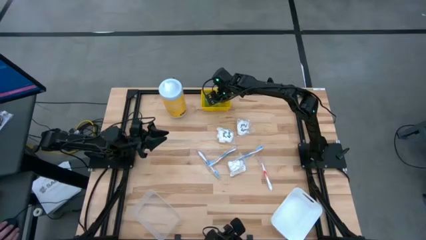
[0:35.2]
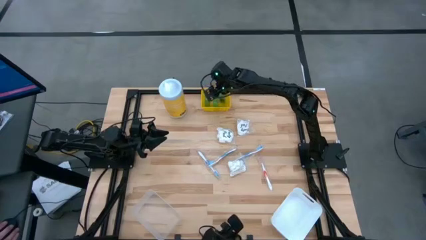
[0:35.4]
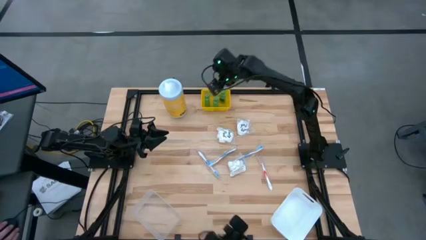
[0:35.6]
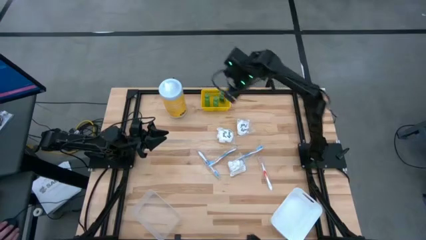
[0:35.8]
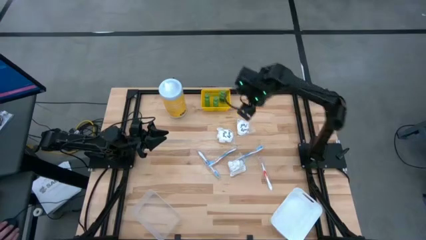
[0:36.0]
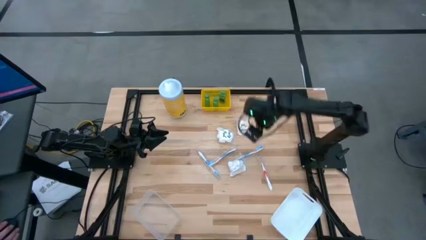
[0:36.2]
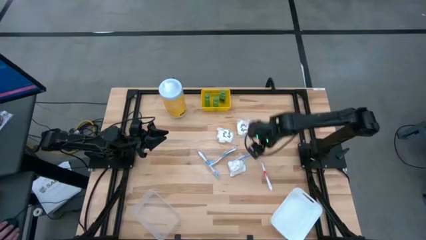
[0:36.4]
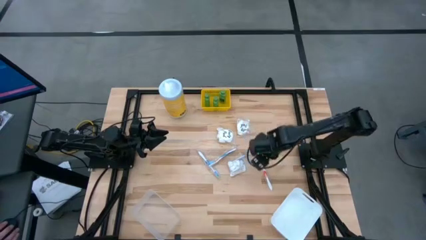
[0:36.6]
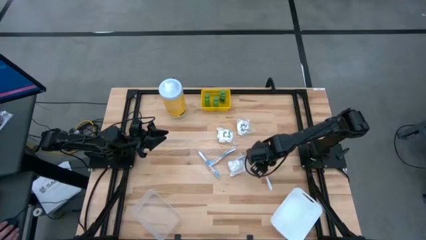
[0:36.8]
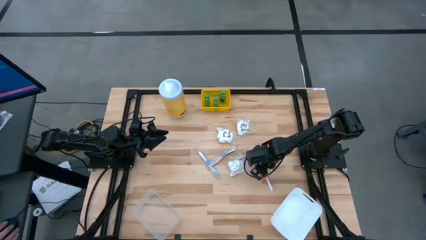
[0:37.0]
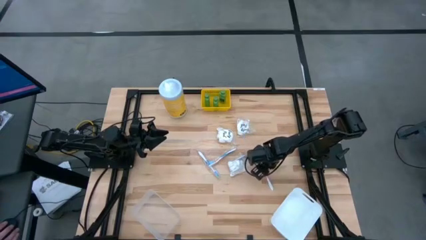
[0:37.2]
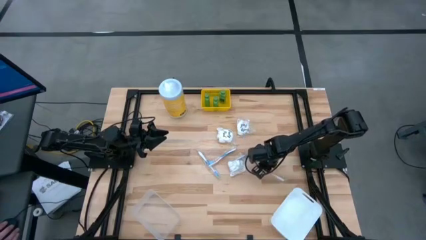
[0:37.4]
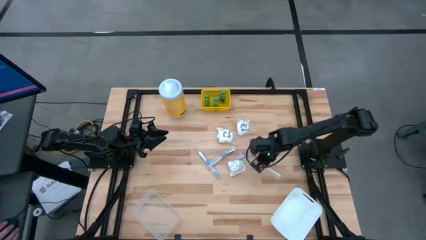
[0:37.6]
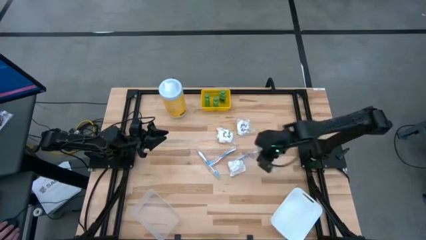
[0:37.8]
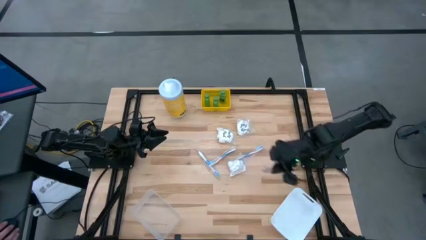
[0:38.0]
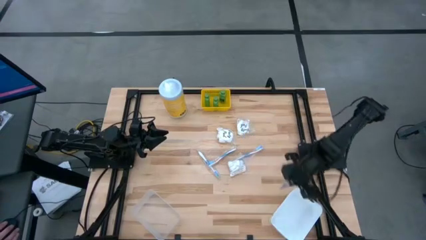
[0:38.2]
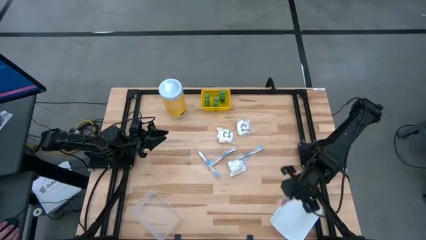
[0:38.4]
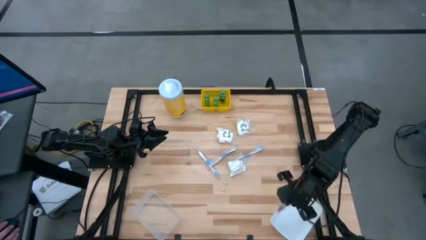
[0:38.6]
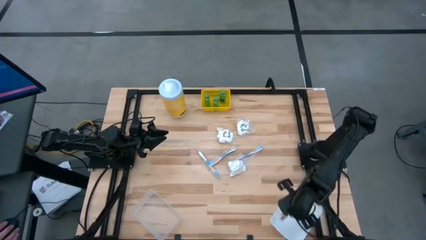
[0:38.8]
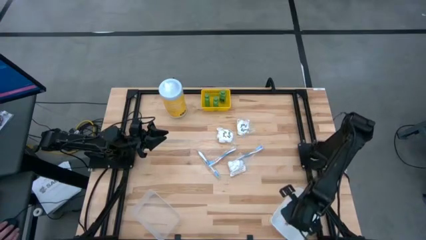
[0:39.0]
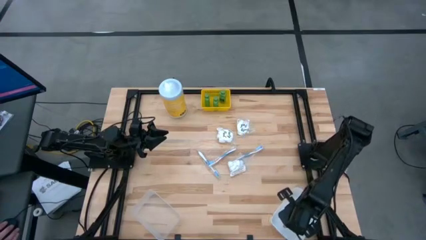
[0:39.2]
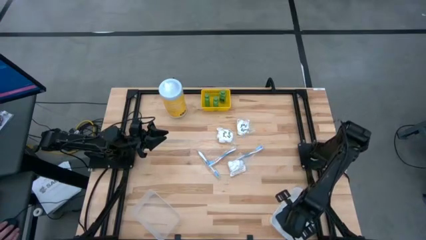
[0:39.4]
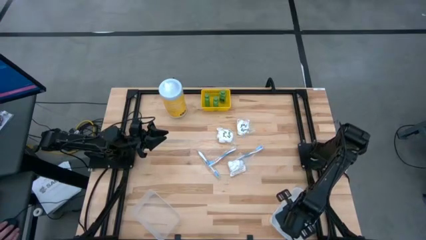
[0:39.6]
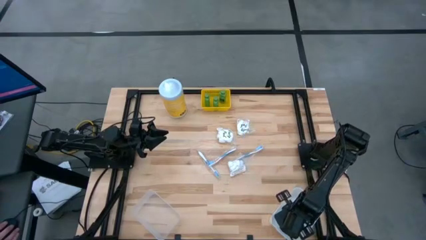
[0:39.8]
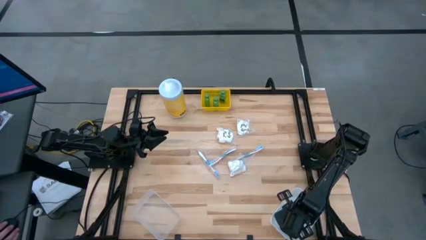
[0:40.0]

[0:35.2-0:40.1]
Task: Pick & Place Travel size toiletries
Put the red toothbrush into the white bin

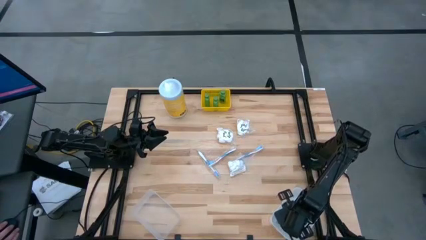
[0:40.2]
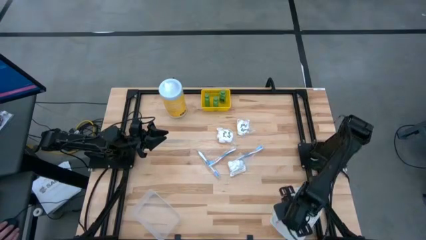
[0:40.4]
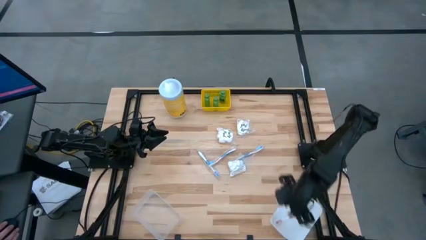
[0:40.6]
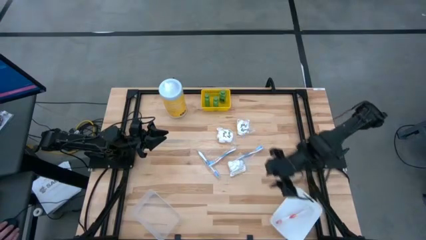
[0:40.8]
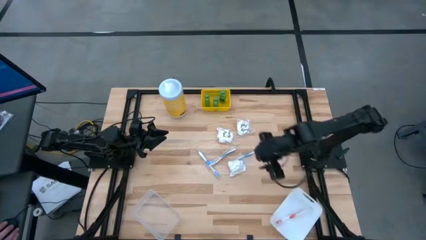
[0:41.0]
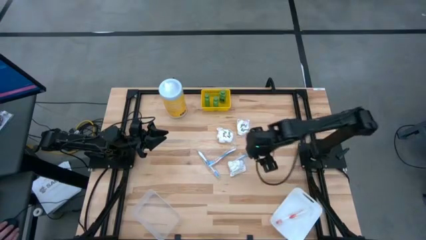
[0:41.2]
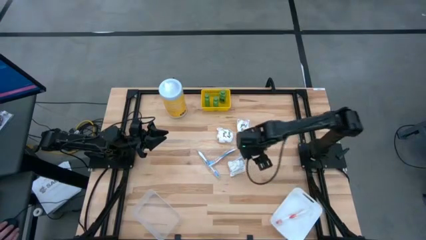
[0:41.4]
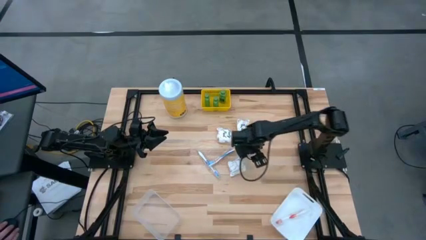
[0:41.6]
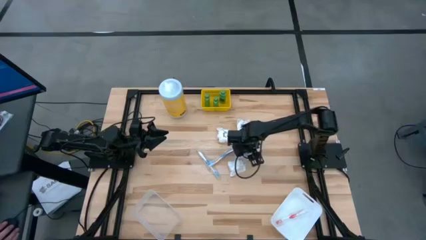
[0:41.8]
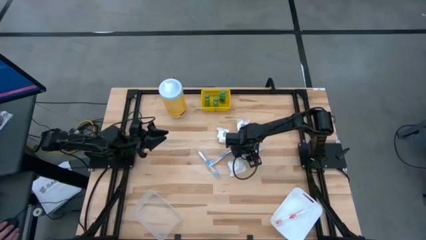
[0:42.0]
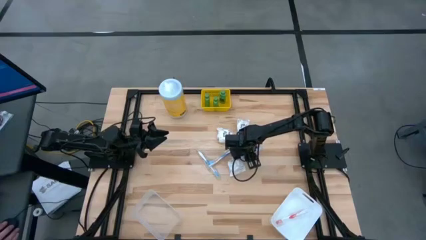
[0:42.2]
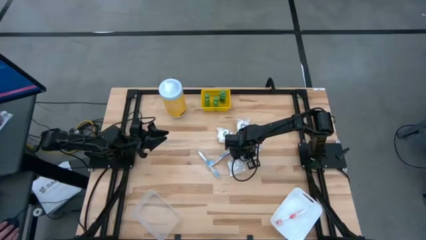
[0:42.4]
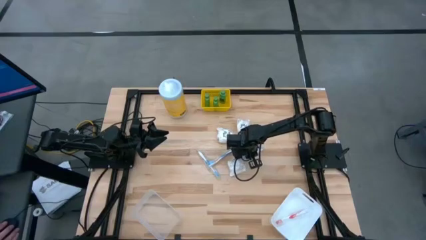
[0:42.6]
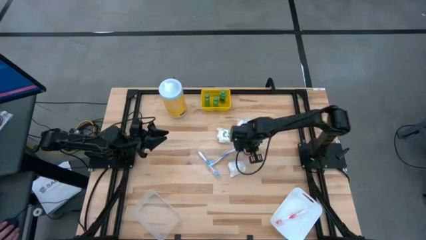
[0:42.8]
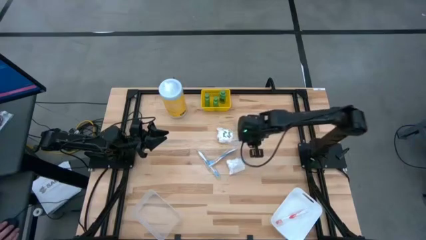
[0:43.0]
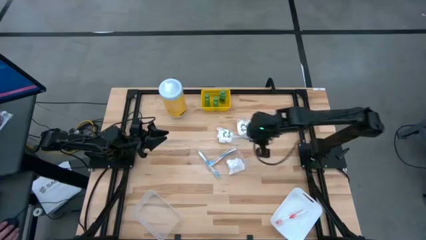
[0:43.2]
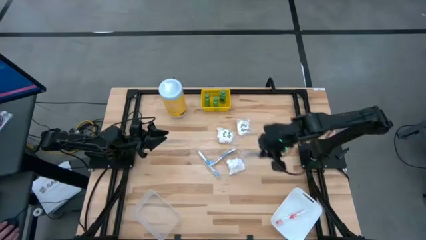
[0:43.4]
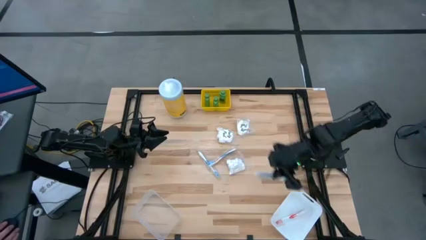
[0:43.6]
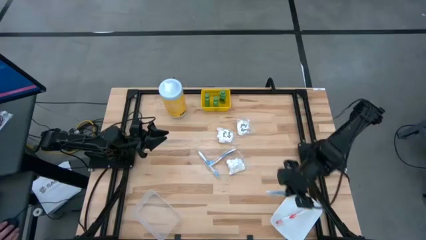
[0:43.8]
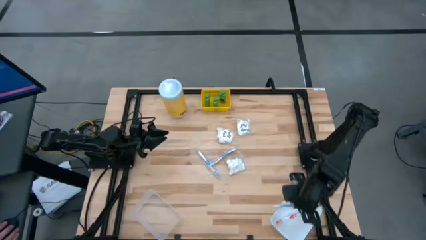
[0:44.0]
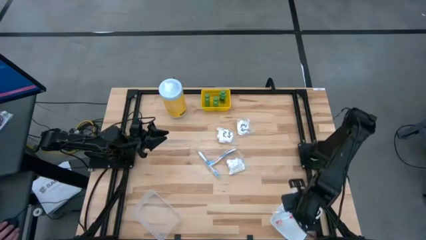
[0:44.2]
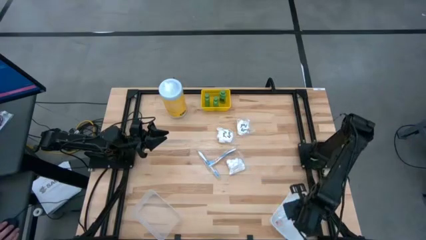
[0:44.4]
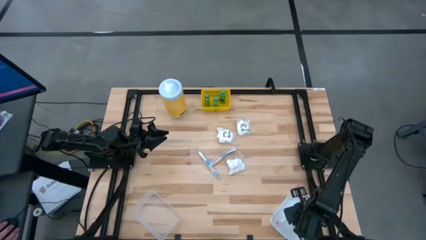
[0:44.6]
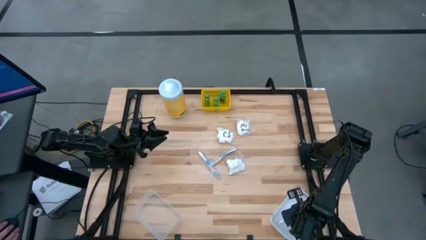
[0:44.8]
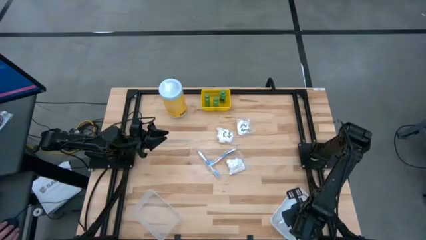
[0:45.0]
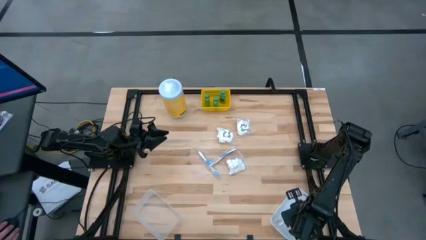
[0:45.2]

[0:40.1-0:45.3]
Put the right blue toothbrush into the white bin

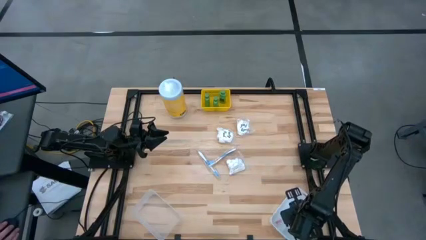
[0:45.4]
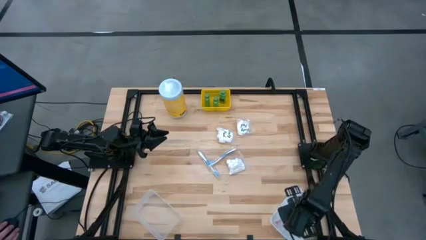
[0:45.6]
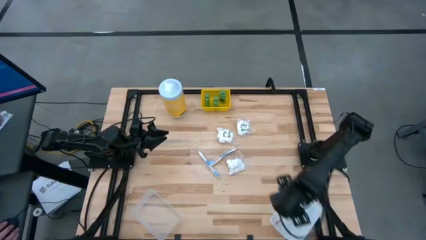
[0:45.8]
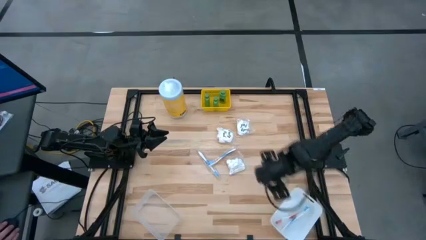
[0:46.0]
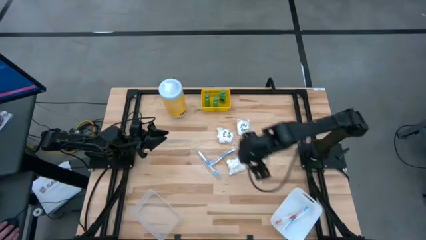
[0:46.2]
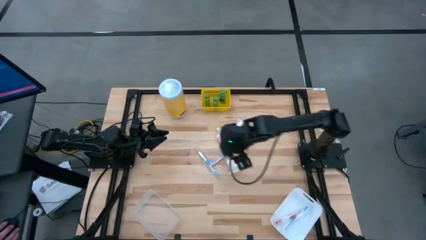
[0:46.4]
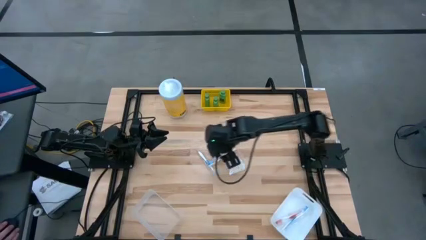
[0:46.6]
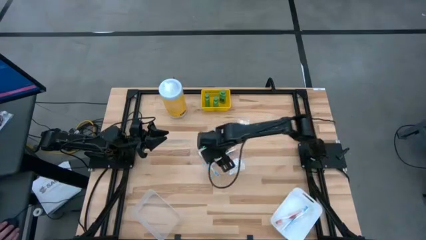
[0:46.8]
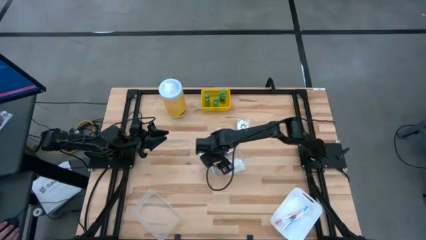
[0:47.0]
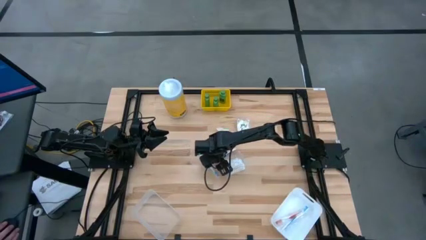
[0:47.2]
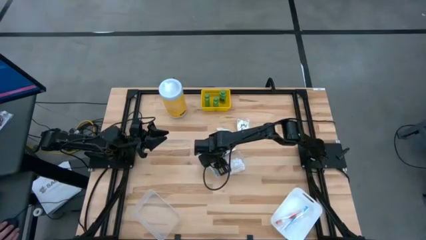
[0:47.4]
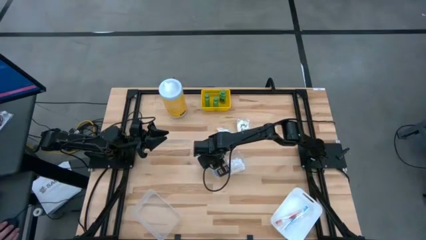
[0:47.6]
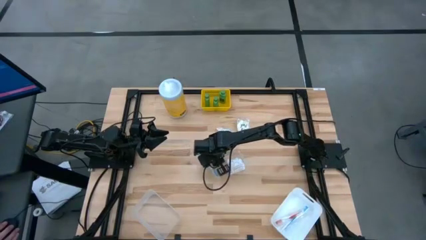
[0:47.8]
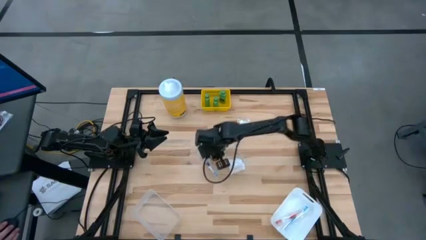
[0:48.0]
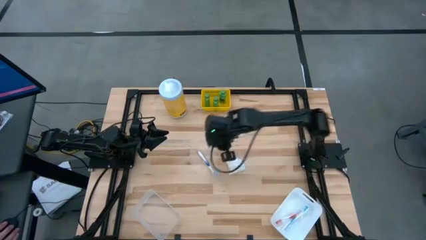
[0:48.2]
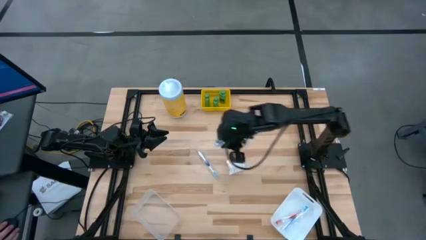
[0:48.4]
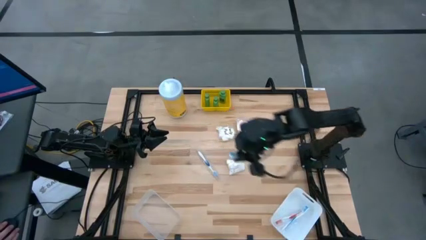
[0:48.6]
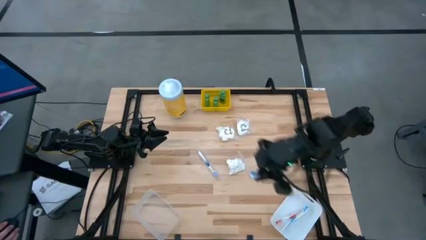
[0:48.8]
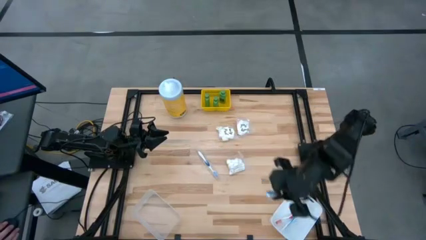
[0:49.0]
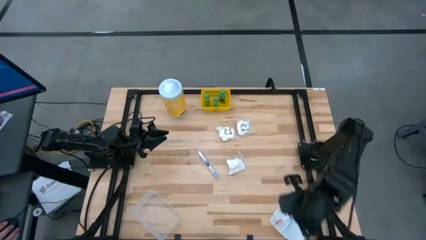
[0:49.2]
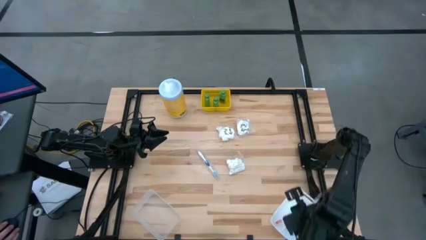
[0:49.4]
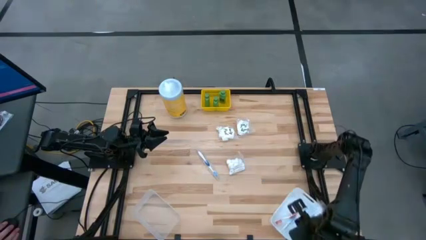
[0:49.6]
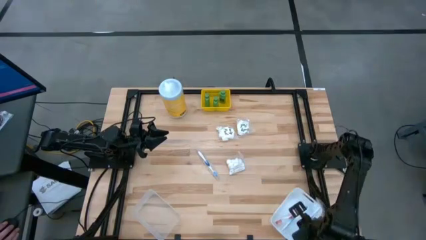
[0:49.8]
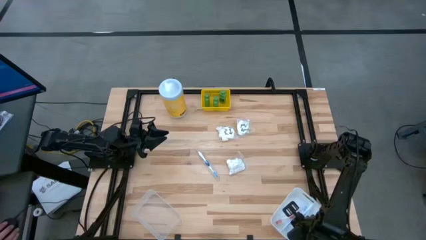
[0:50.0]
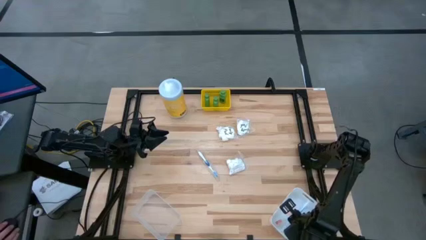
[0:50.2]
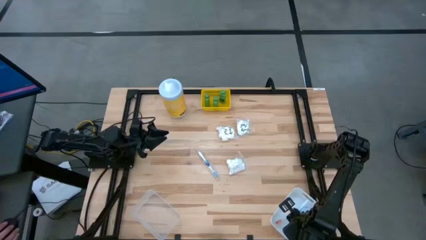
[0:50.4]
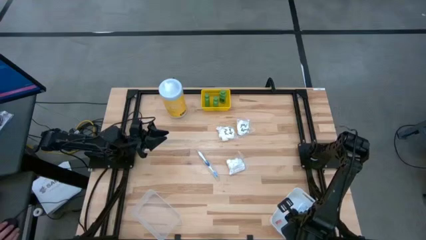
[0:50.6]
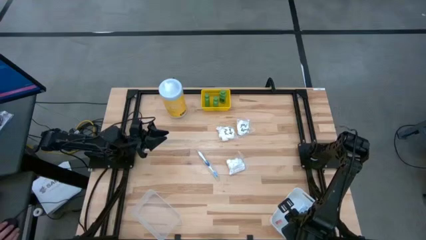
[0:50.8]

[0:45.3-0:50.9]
Put the blue toothbrush into the white bin
